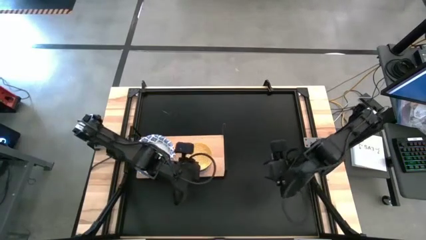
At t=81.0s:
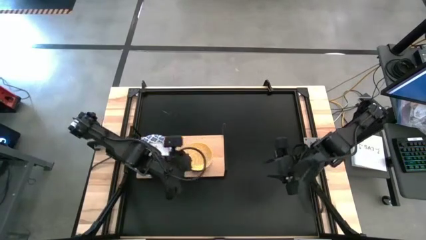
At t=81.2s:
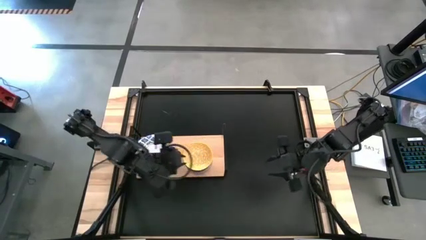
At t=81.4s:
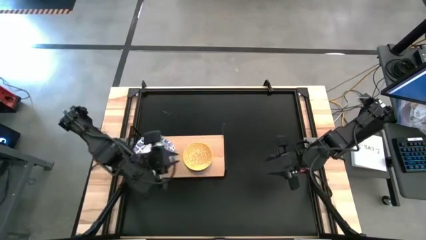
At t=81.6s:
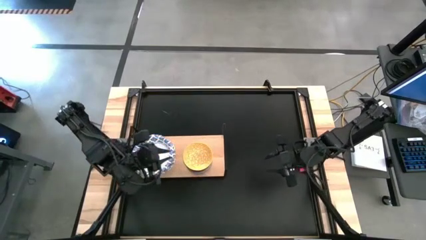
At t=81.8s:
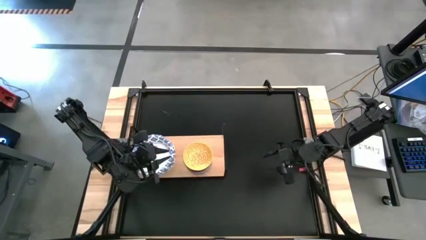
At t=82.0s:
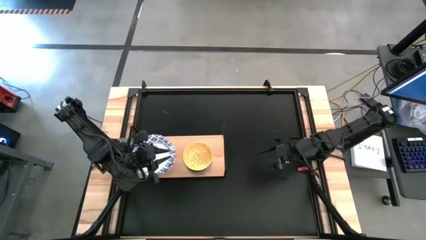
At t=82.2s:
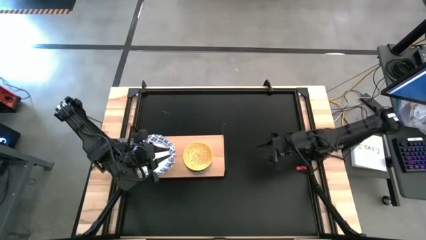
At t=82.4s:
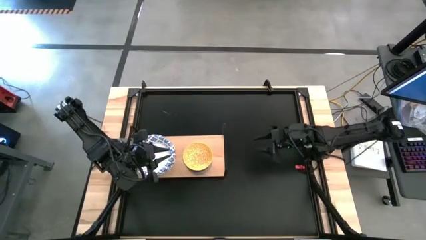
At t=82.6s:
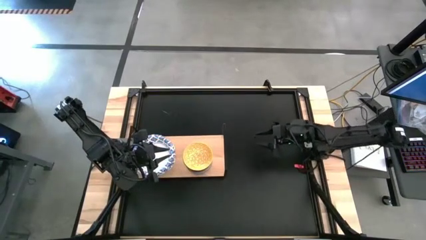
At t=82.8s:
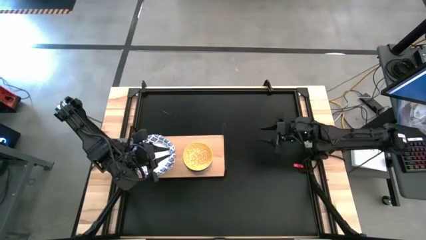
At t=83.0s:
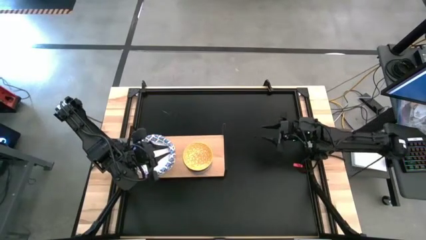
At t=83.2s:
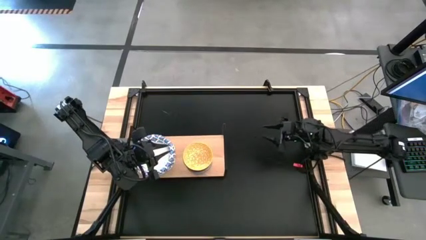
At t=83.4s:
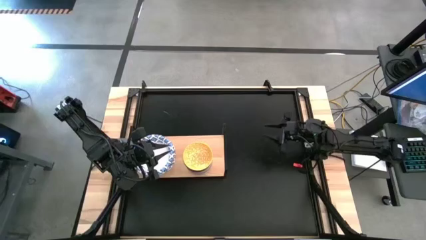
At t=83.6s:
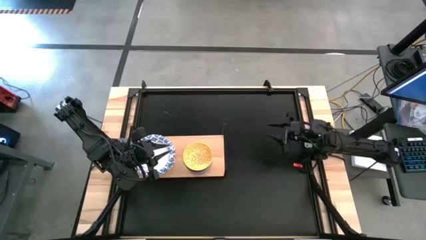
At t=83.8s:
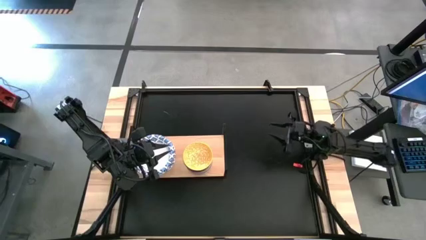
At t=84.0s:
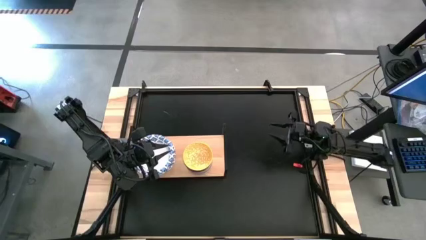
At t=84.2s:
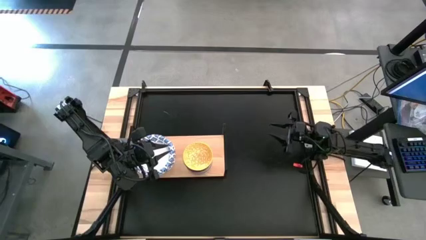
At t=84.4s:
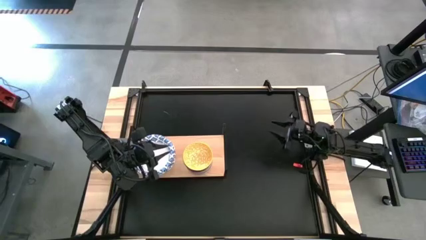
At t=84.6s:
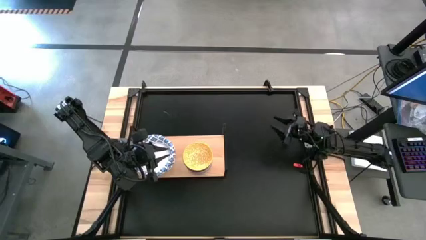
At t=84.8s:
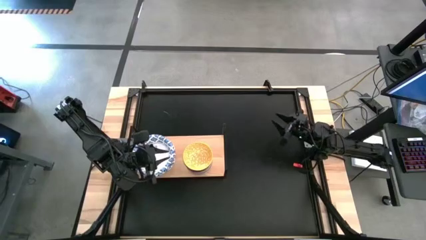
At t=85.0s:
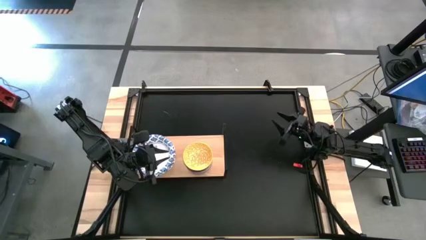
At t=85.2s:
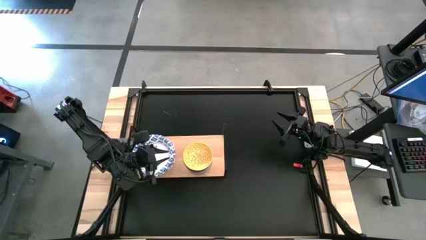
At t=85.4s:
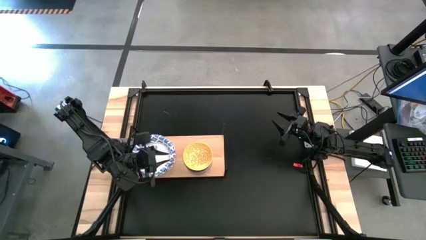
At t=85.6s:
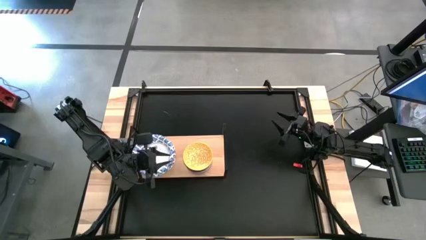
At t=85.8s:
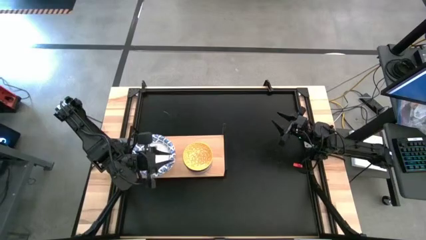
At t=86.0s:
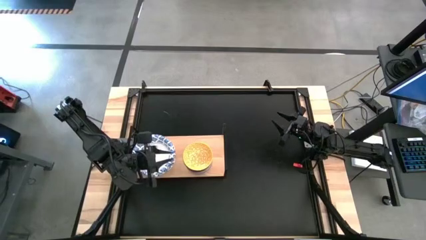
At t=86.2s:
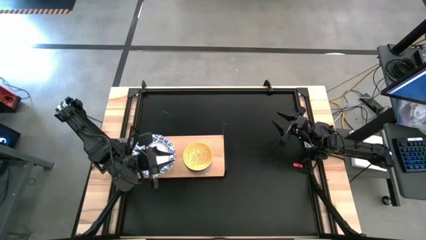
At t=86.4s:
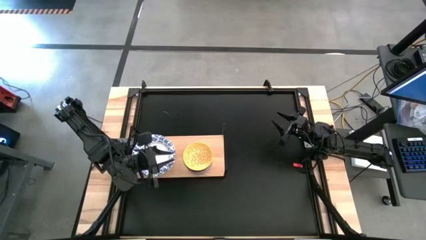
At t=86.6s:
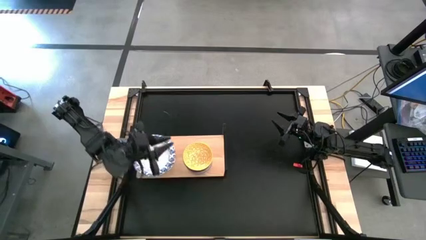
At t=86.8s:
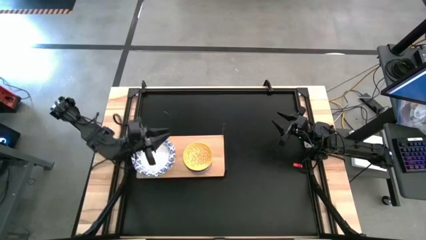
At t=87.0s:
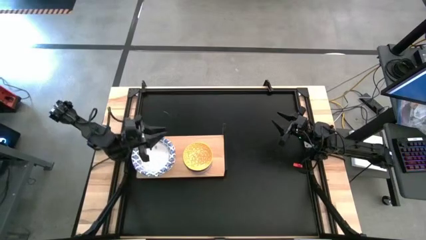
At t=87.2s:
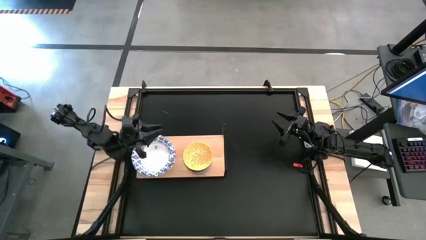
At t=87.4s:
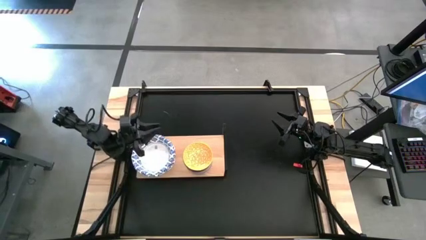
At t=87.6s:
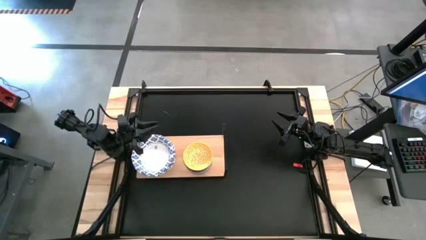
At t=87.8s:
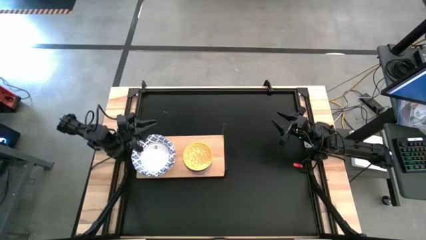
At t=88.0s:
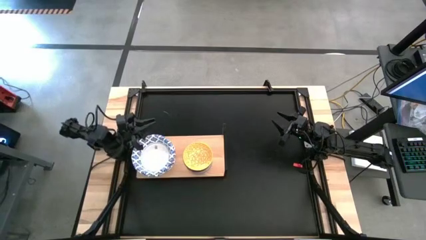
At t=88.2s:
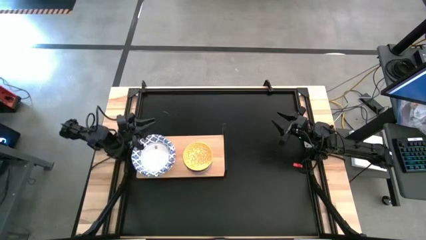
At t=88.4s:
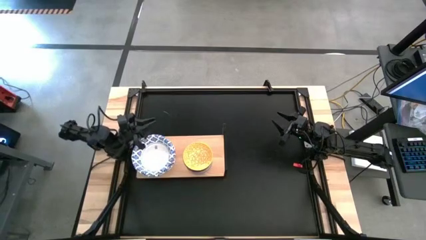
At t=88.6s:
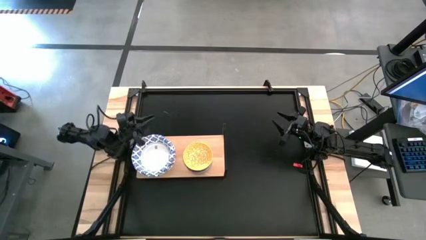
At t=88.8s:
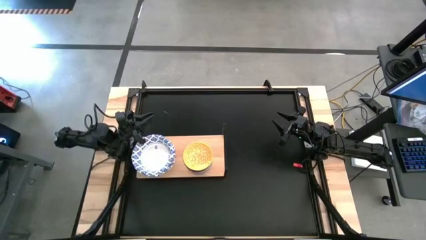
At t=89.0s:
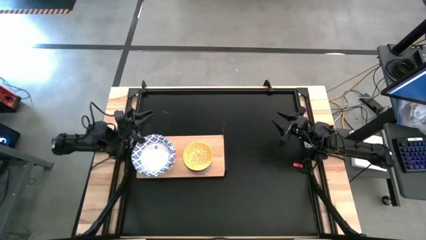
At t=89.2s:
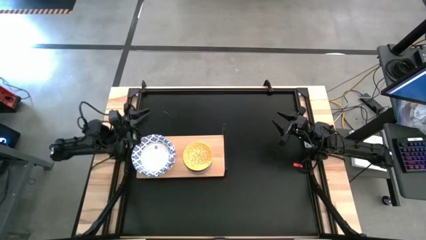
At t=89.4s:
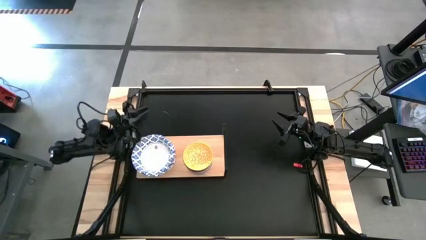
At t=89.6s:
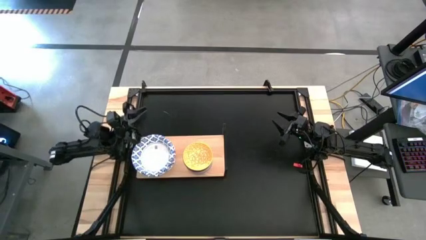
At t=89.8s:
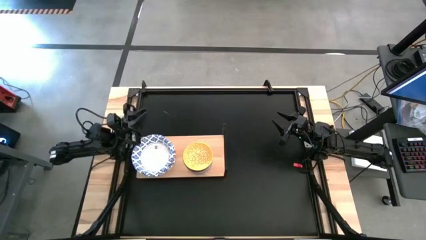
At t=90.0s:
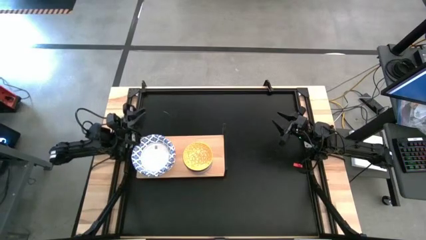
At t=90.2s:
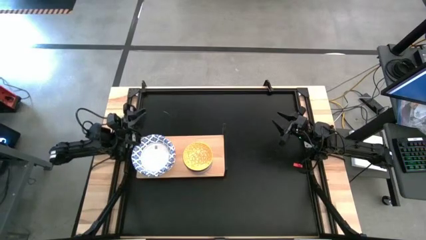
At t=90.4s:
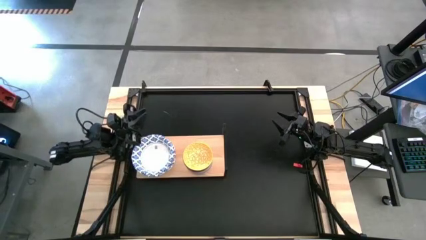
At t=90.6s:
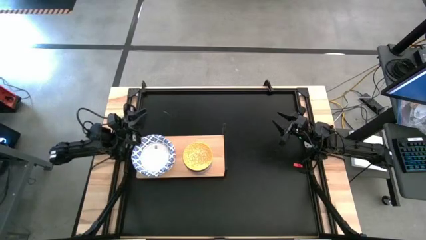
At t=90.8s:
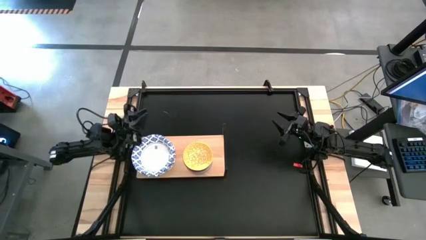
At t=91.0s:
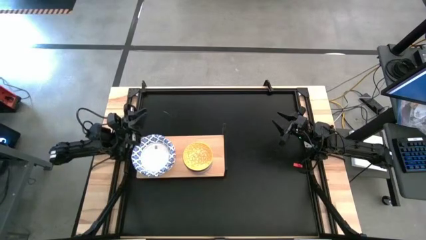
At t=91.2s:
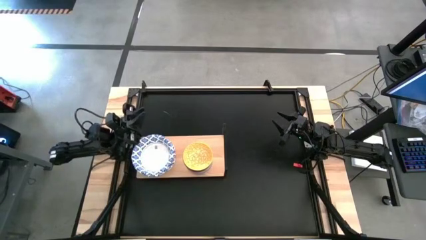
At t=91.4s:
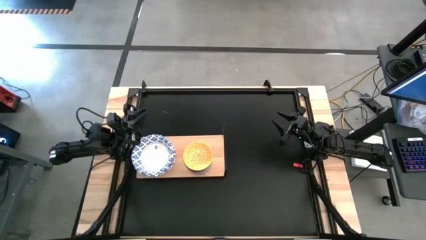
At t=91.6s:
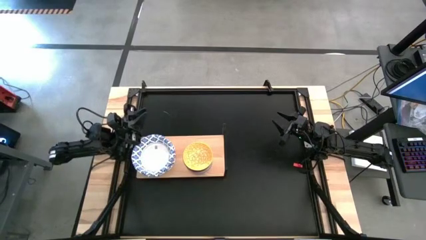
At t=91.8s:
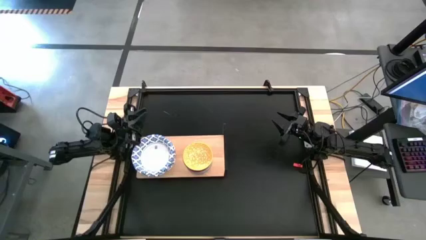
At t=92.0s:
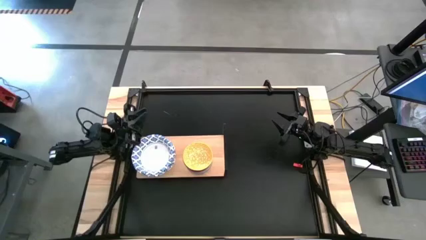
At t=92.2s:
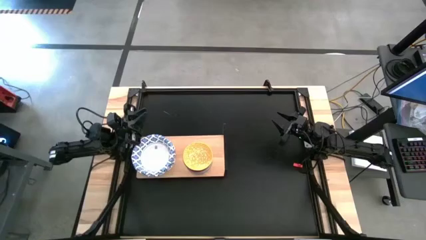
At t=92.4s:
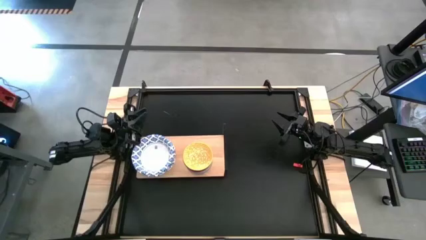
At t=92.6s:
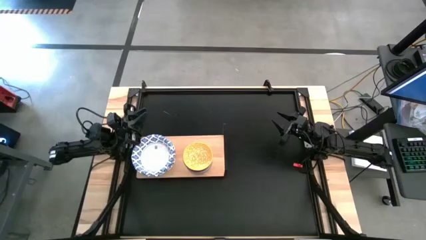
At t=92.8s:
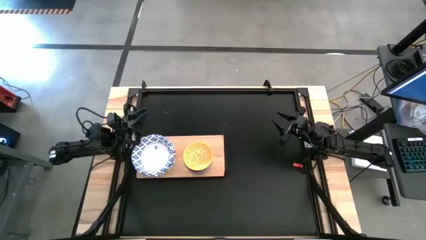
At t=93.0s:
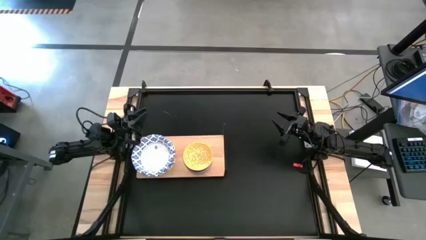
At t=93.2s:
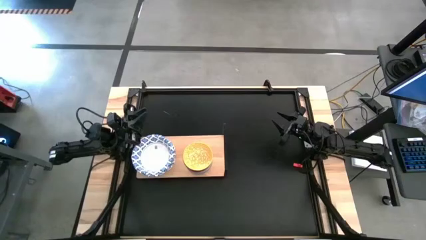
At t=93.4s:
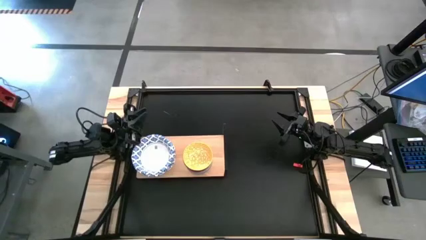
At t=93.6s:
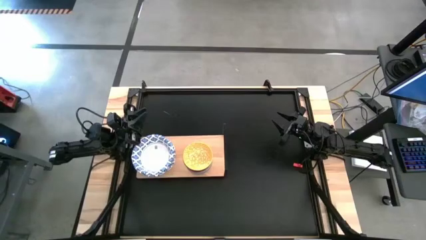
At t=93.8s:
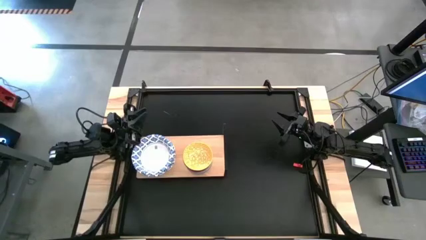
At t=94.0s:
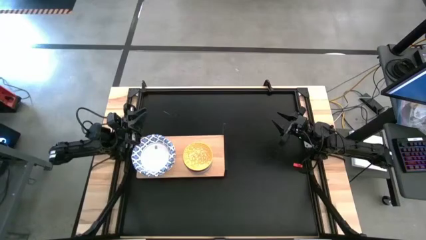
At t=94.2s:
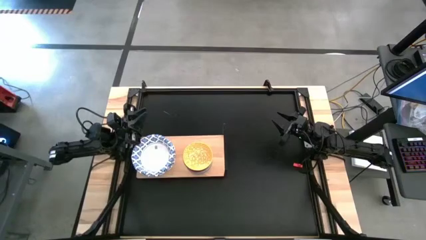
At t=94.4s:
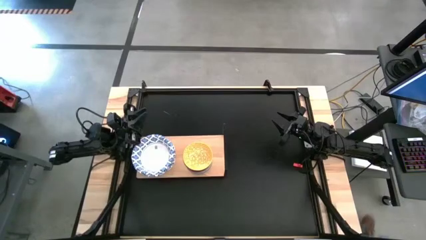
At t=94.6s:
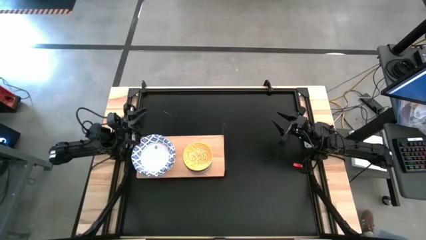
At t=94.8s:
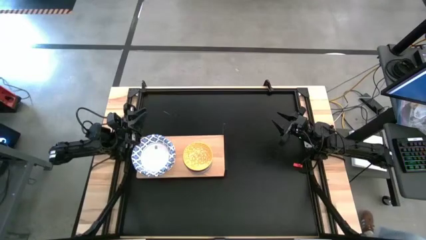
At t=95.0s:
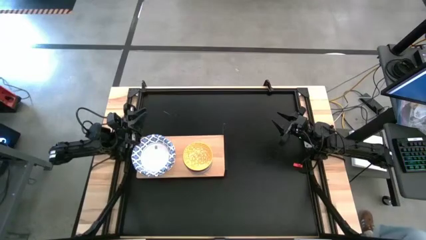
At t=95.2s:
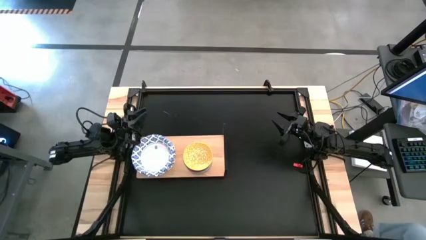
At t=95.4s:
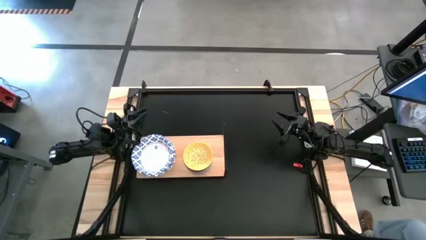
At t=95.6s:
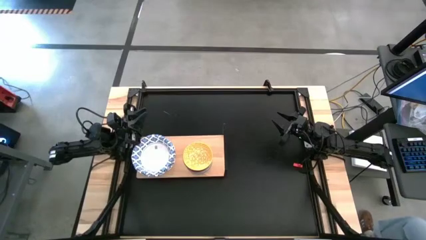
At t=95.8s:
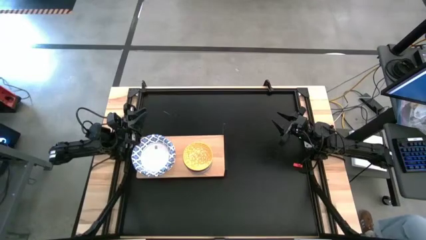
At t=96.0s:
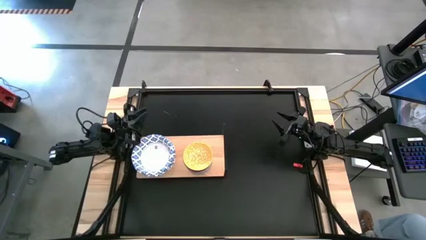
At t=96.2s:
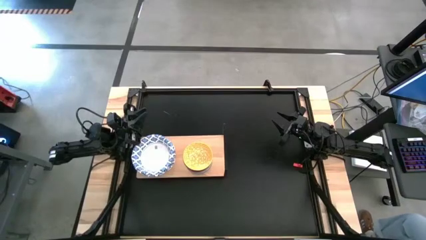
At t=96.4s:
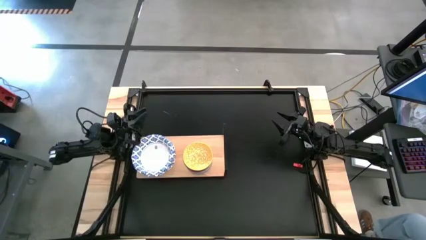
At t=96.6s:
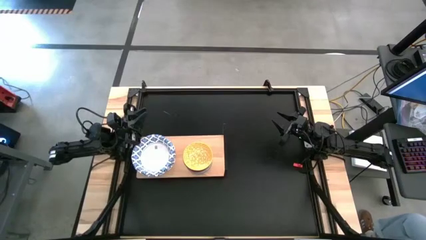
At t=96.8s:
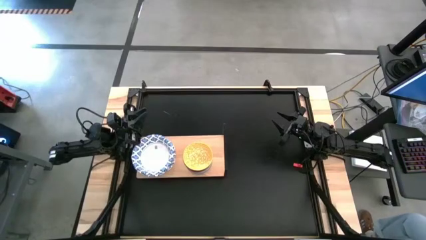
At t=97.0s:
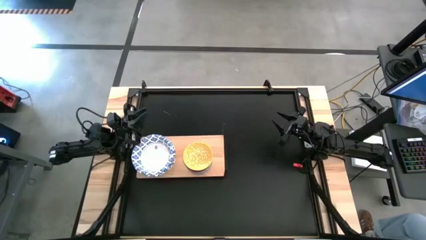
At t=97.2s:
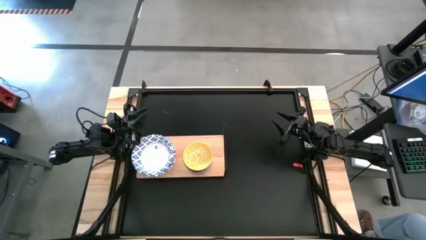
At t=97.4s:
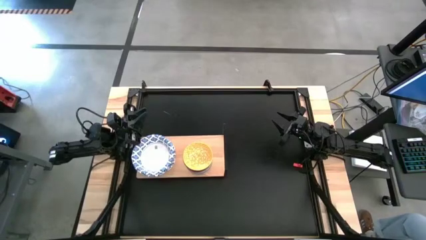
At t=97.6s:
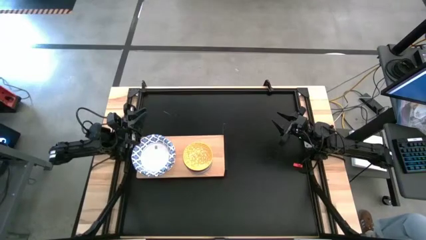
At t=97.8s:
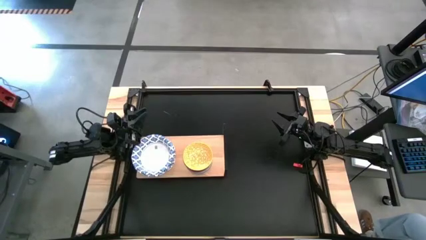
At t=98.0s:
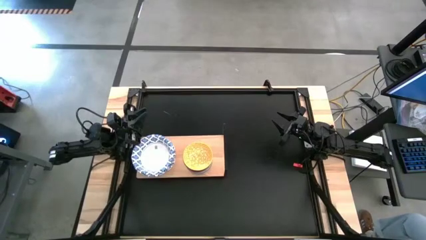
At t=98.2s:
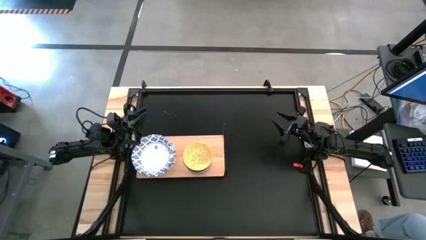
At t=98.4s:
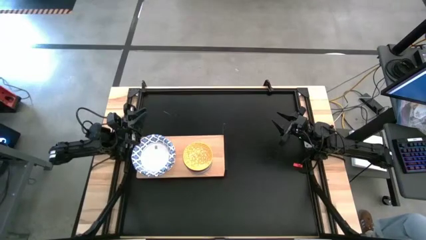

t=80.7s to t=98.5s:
Task: Place and stack bowls onto a shelf
Return to Home Position
